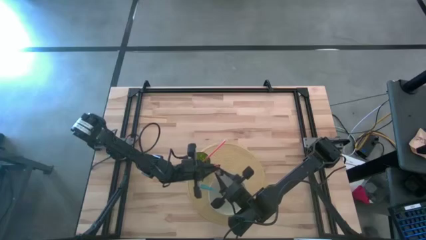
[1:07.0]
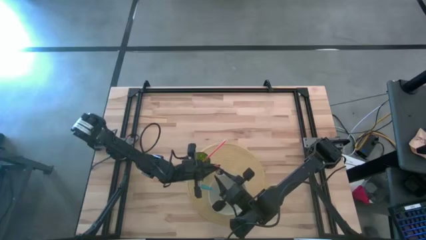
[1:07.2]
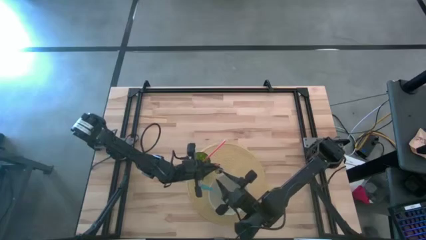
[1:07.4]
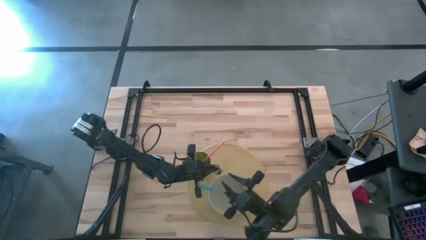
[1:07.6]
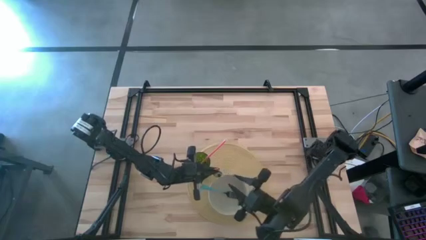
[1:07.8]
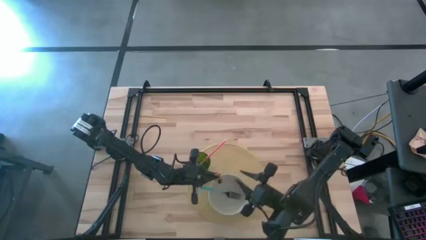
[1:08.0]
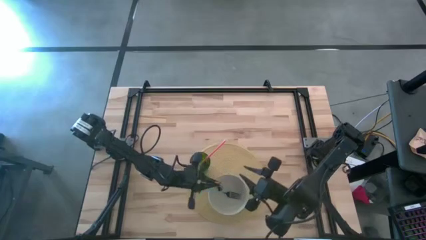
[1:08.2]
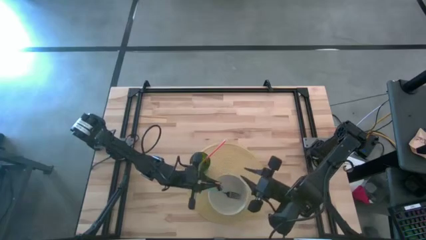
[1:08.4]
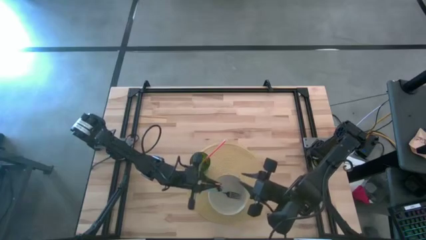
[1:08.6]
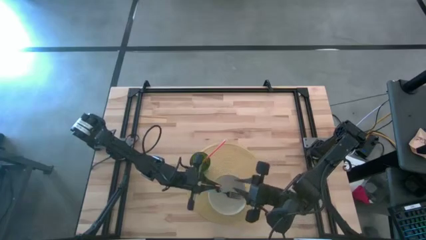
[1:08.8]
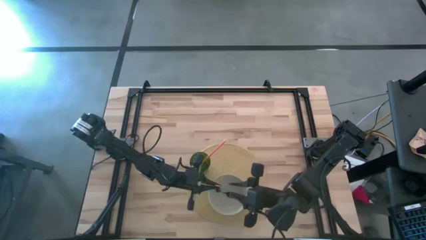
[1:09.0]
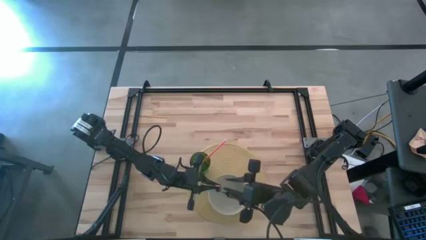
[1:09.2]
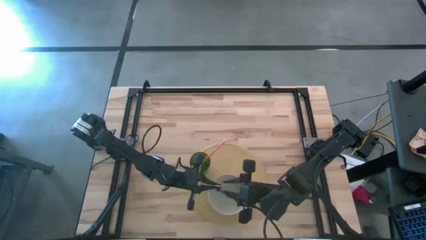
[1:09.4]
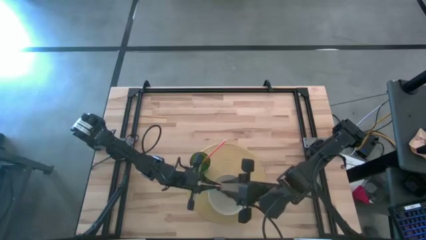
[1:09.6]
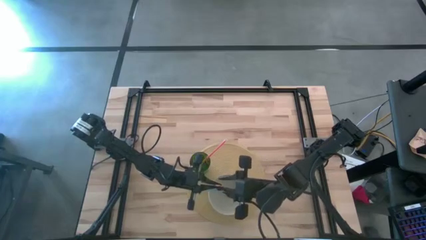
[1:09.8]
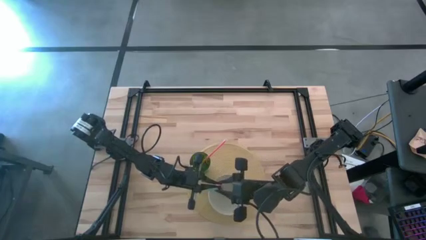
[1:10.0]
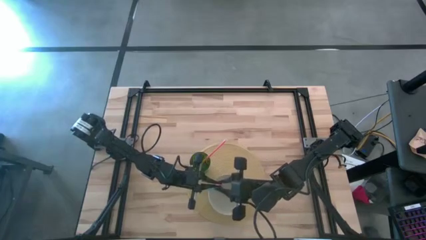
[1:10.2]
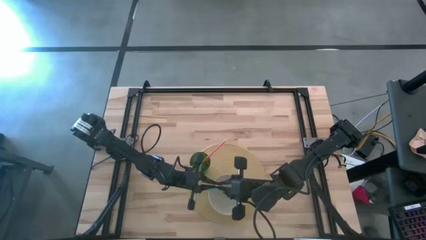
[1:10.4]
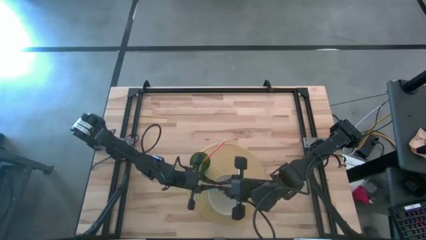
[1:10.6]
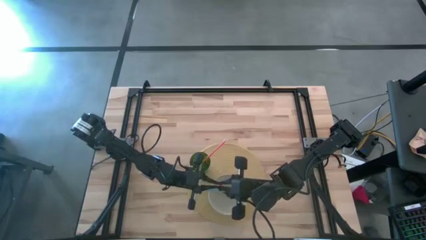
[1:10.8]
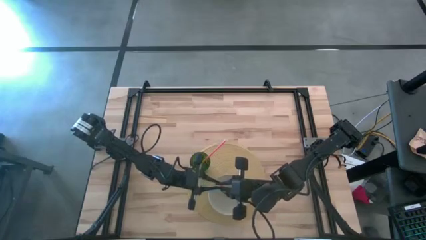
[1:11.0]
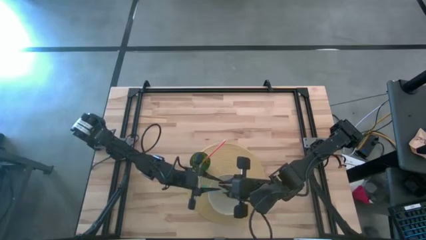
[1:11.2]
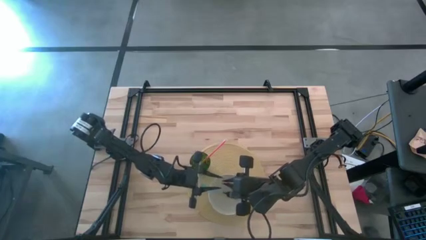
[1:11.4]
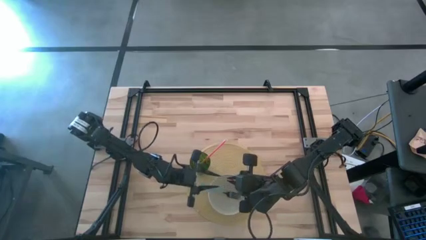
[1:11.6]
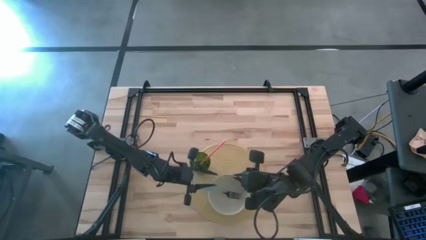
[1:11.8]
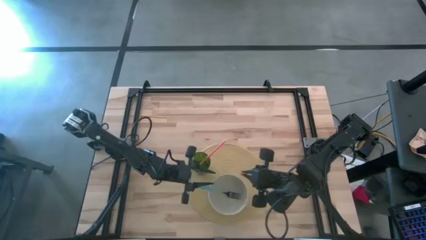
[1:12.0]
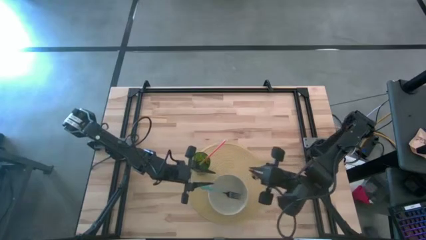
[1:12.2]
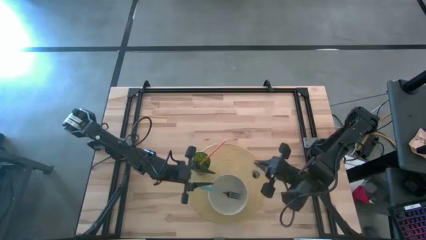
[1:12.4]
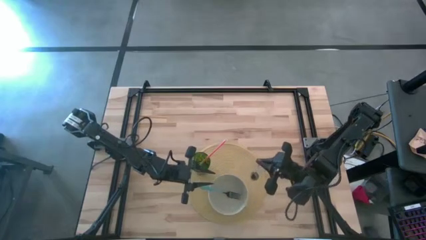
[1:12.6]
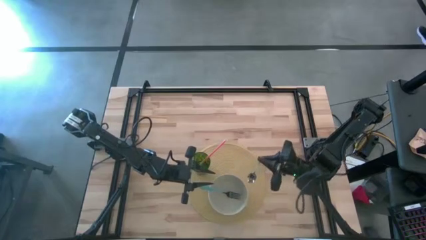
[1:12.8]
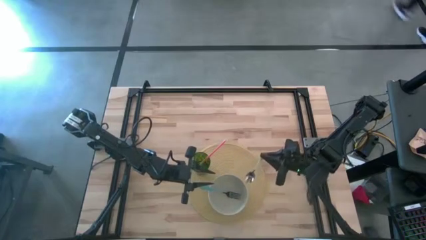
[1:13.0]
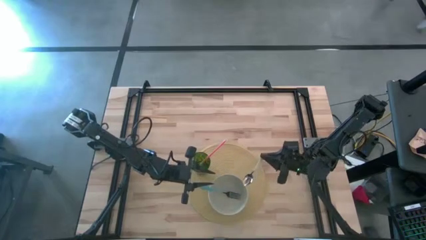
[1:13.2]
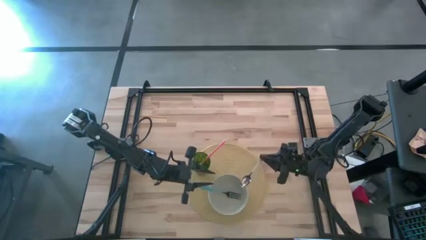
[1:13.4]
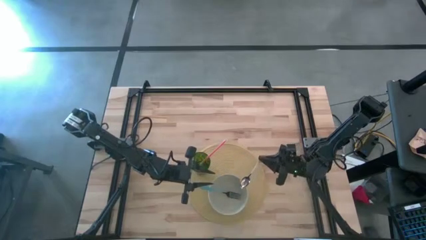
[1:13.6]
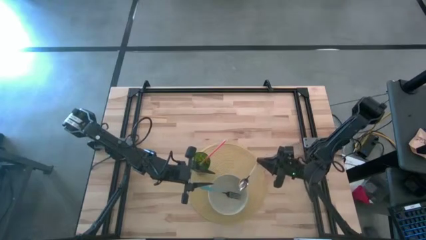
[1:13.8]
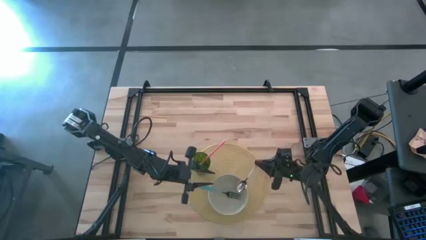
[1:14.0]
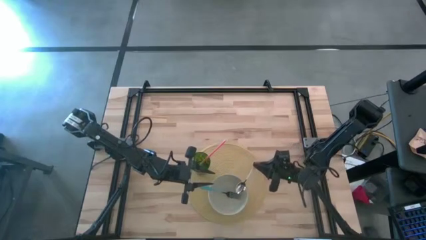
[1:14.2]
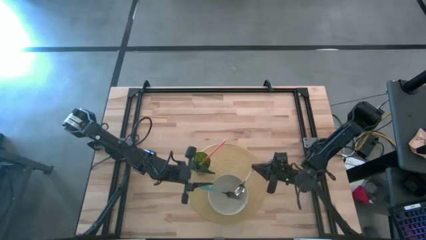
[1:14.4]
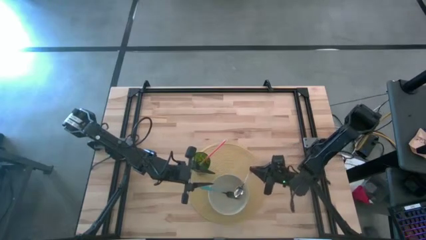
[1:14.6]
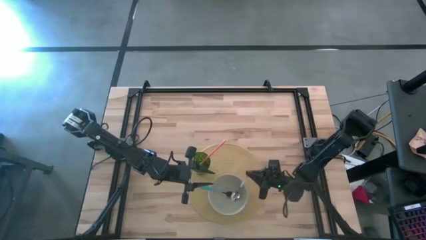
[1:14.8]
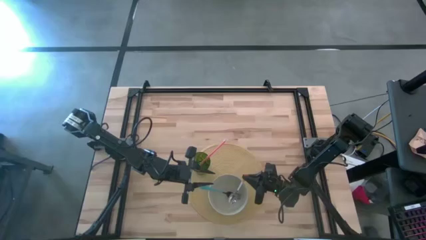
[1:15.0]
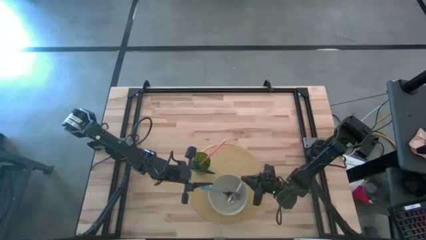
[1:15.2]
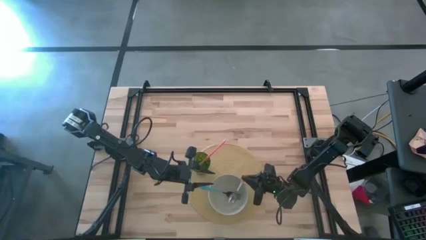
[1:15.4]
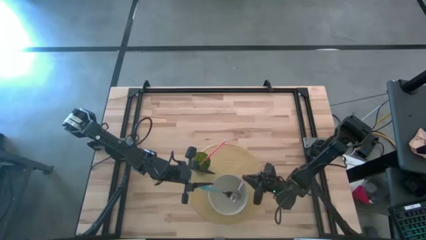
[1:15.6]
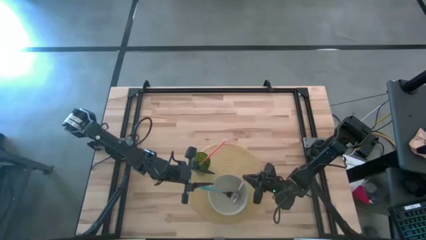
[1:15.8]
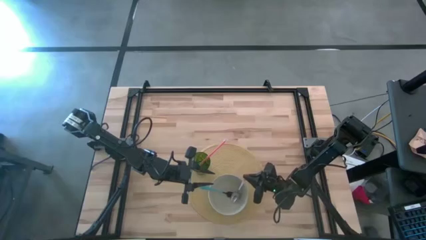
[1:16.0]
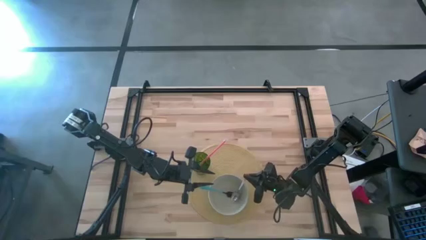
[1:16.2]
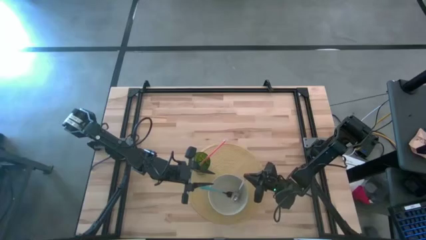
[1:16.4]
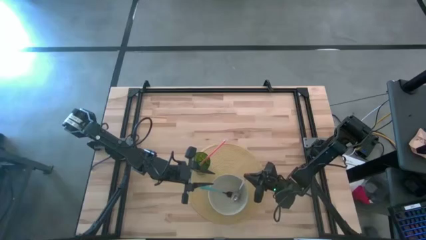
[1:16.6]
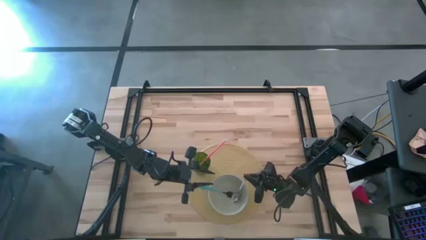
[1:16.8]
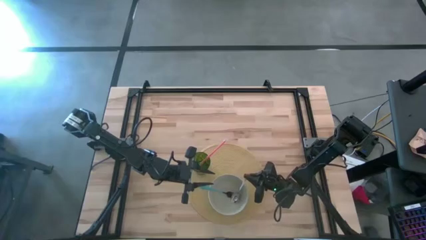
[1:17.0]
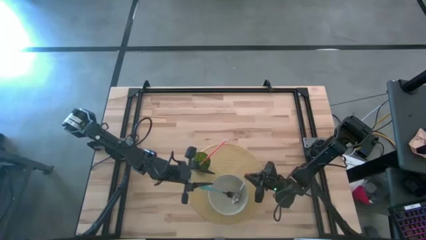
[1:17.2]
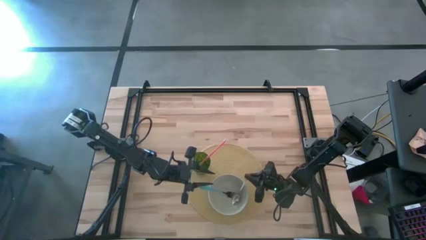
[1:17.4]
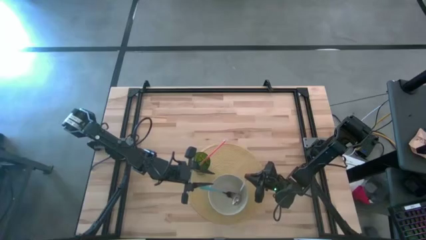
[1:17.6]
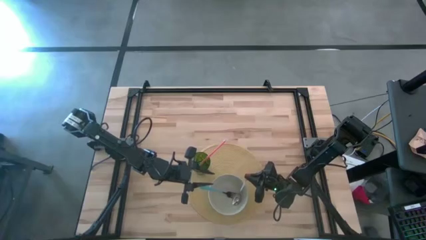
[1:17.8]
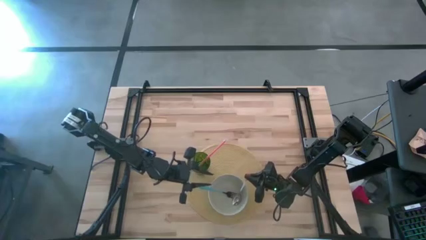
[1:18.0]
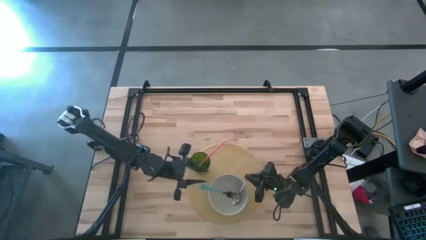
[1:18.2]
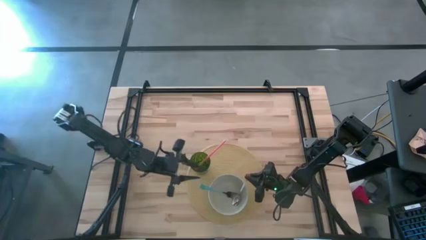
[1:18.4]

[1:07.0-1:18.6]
Task: Pick & Place Utensil
Put the orange spoon into the white bowl on the brown mat
